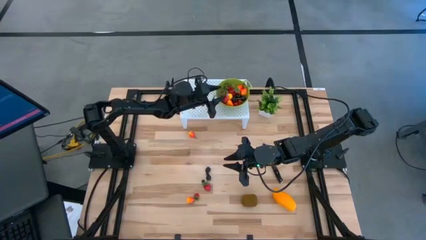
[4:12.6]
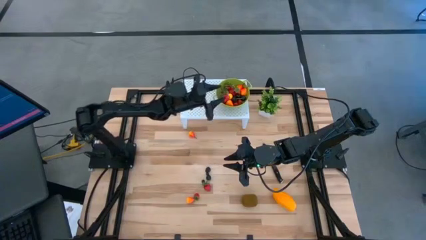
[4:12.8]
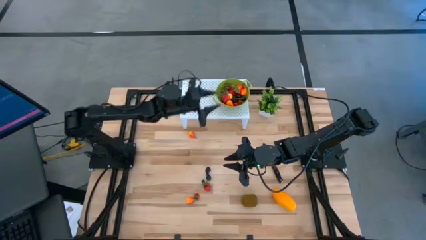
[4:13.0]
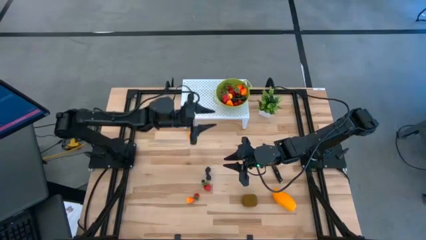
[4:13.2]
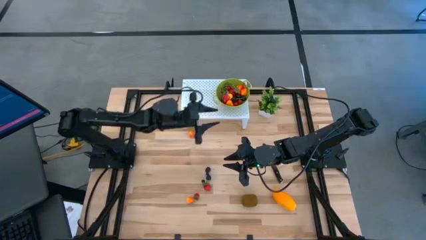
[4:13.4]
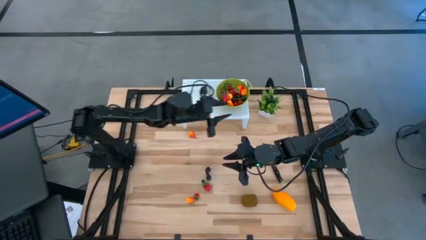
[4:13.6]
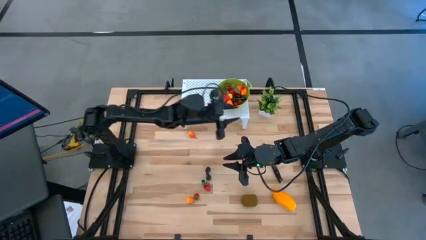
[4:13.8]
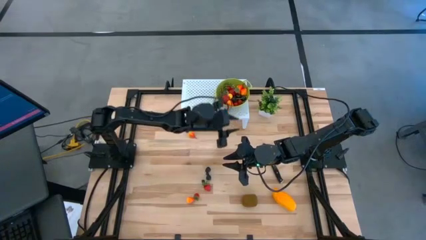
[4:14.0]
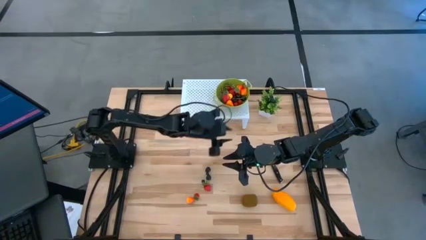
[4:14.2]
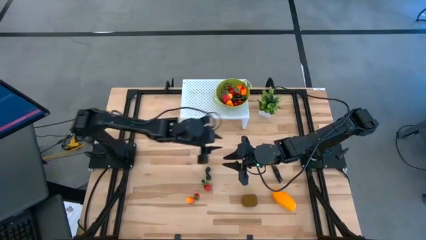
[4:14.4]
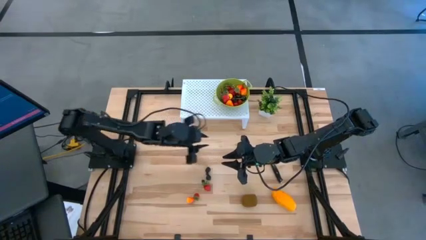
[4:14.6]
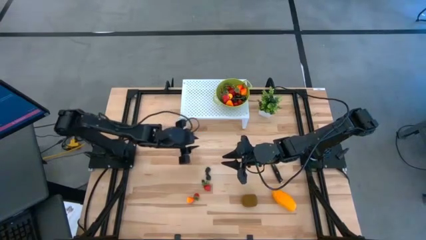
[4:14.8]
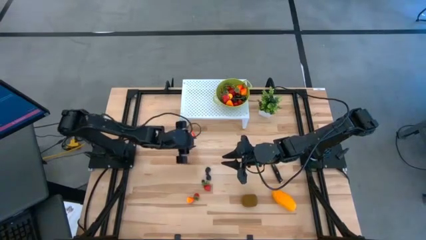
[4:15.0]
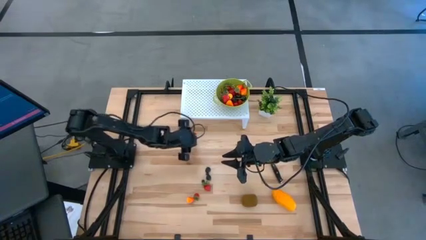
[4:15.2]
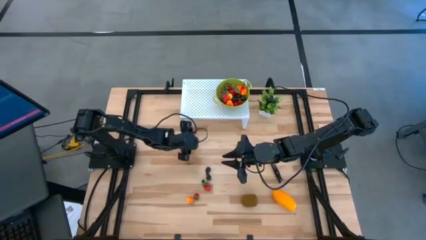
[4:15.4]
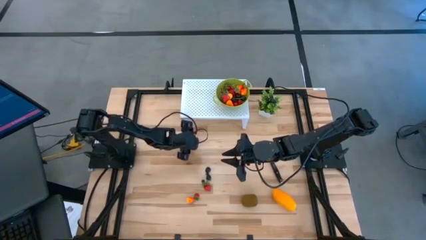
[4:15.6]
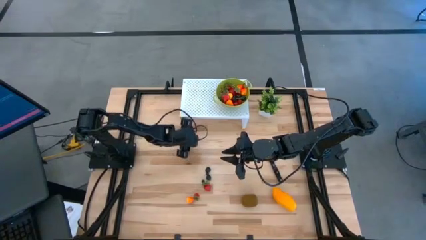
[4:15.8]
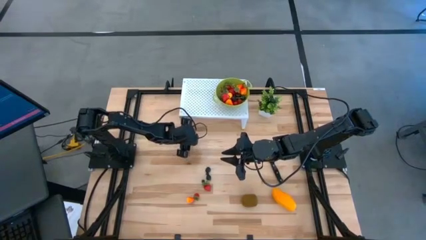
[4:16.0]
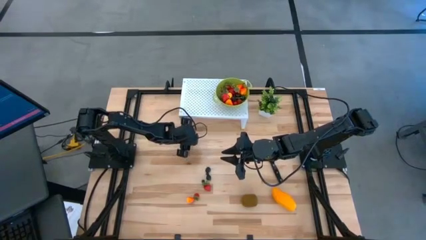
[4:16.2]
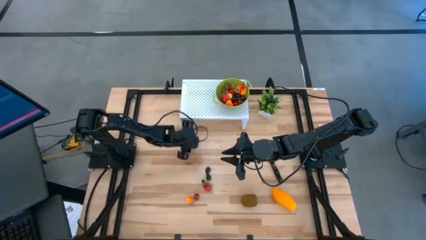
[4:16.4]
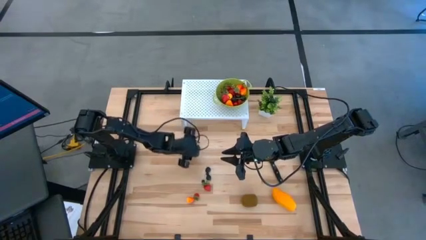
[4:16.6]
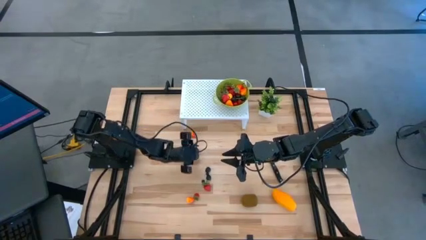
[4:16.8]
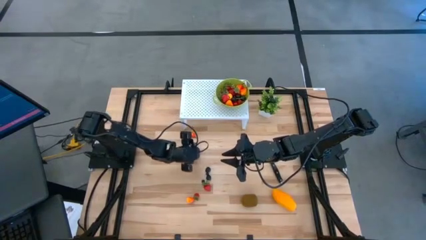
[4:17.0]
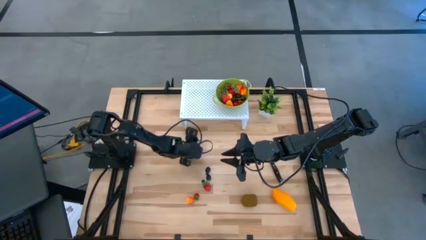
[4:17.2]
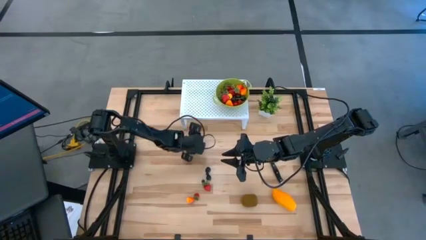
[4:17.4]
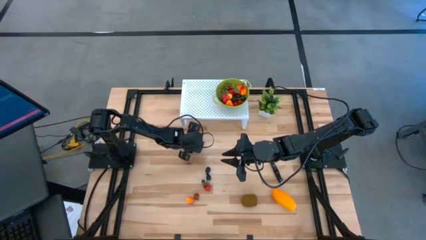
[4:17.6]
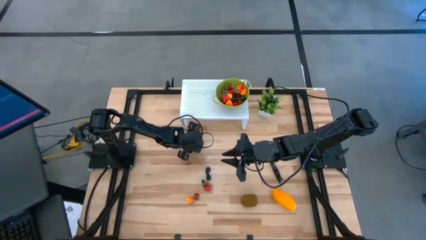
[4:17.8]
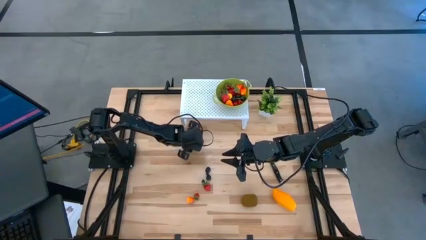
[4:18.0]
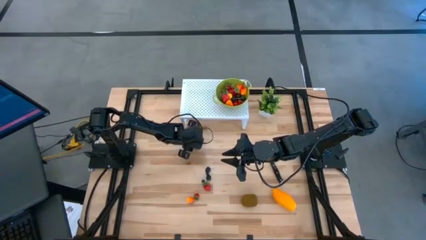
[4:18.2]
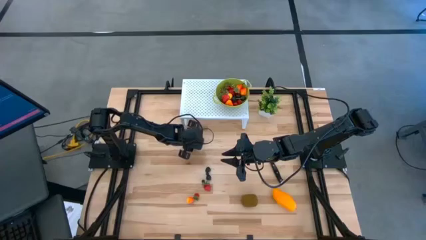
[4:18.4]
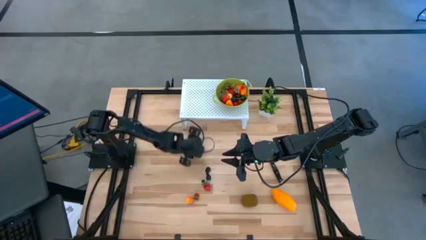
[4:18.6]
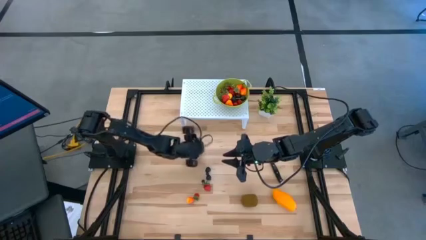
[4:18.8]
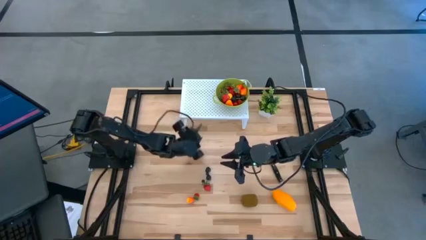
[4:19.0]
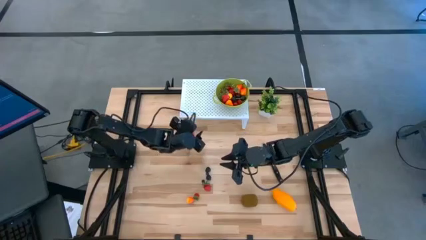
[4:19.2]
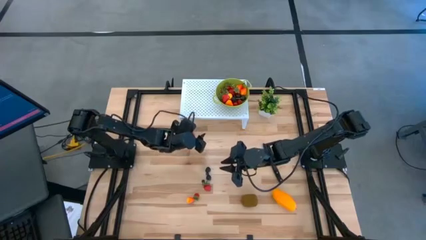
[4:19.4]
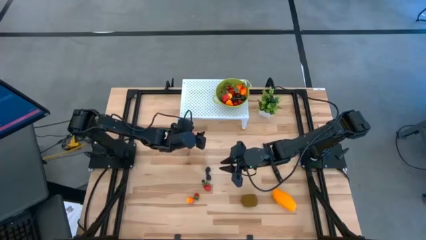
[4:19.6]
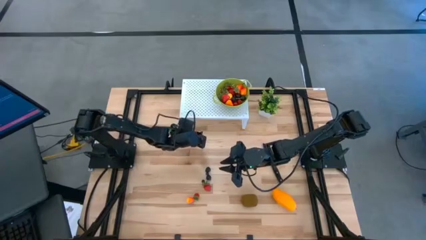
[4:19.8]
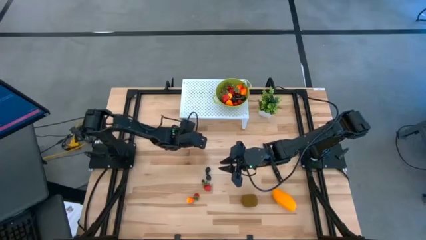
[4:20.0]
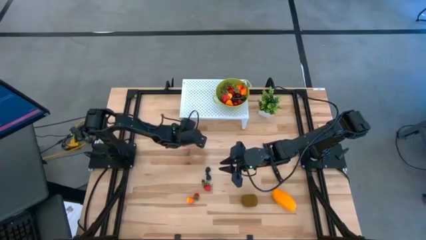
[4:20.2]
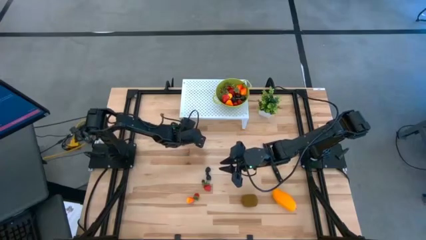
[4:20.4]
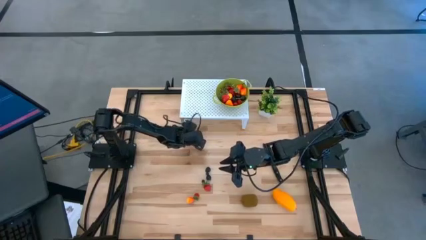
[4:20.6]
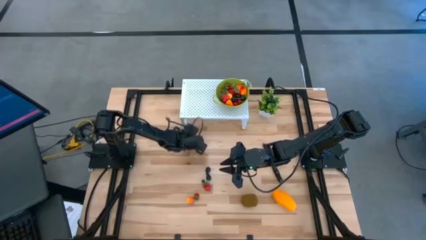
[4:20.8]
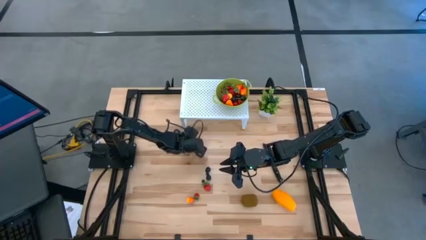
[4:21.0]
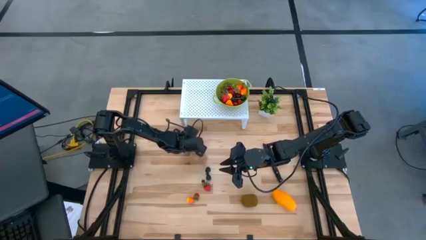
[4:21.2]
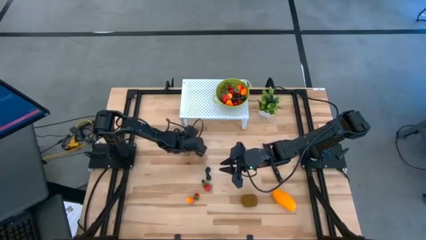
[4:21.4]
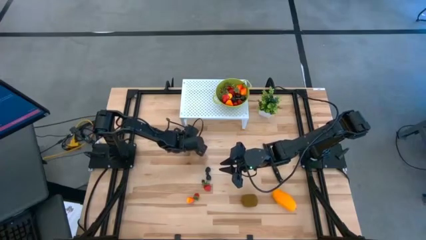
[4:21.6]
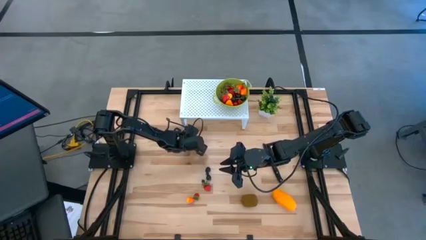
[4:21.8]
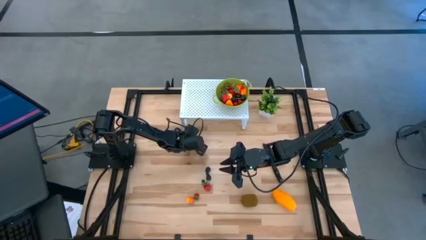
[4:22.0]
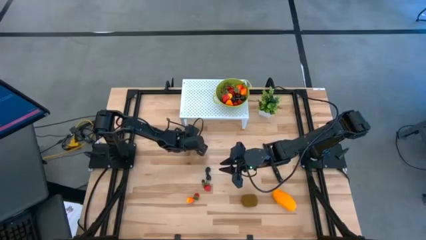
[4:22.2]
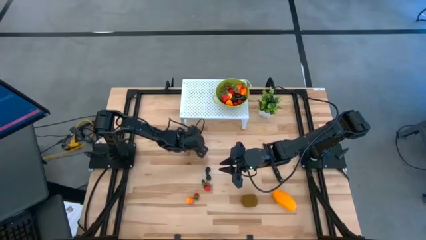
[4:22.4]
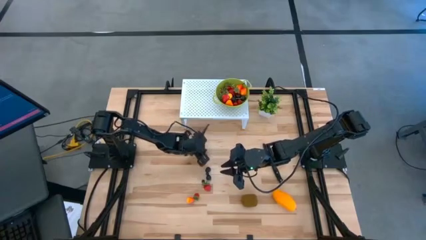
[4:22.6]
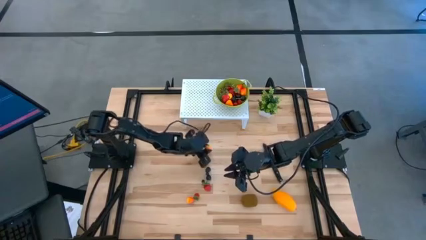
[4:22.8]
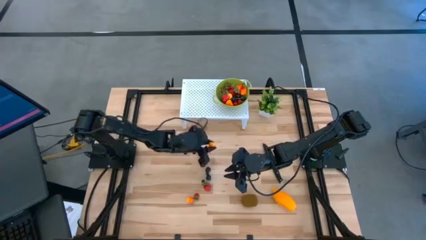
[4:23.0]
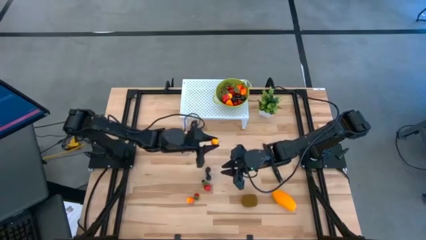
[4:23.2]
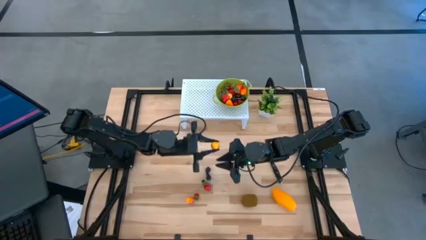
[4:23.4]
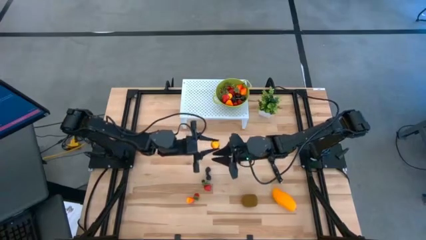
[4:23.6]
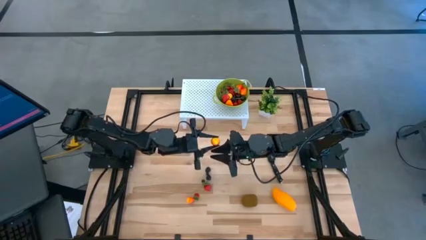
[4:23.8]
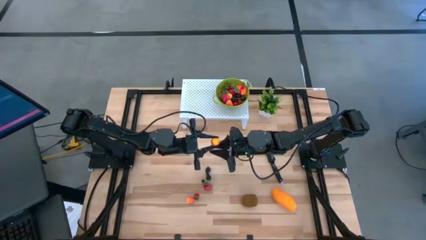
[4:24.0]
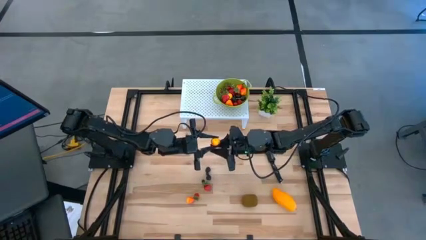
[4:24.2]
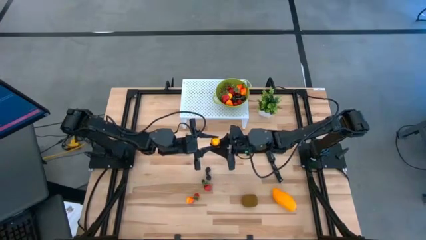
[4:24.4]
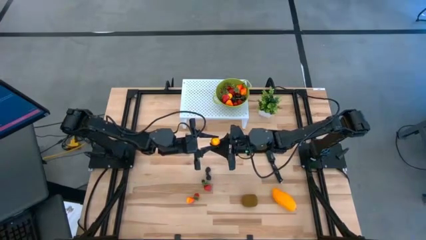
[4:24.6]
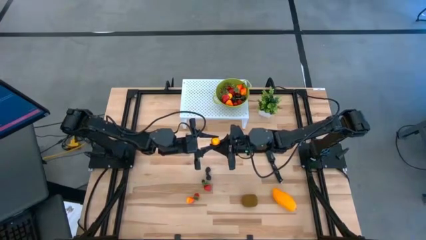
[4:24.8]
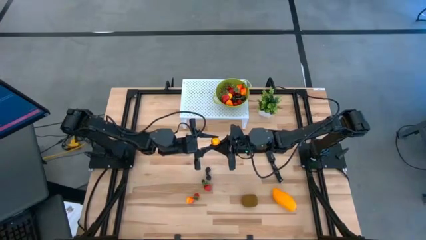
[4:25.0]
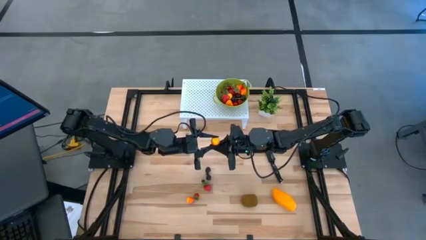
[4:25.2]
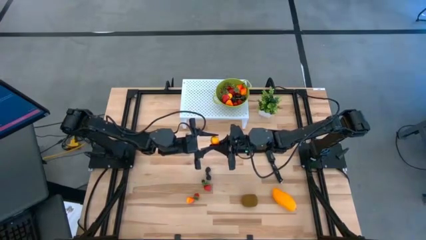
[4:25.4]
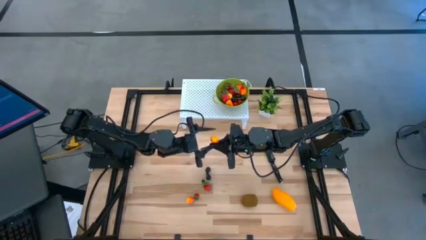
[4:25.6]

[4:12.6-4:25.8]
Task: Pick & Place Fruit
Put the orange pear into the green strainer bowl
